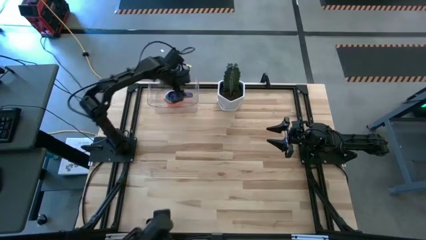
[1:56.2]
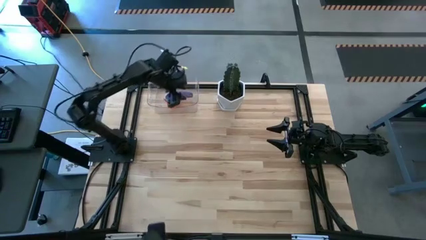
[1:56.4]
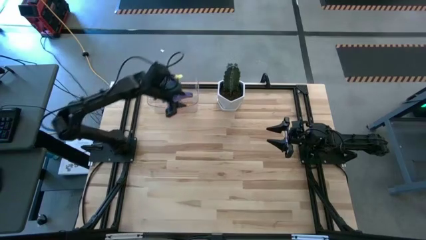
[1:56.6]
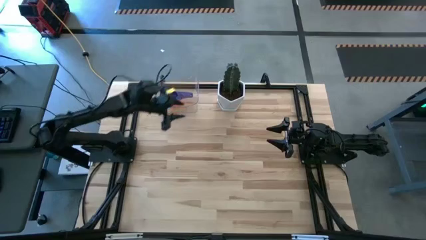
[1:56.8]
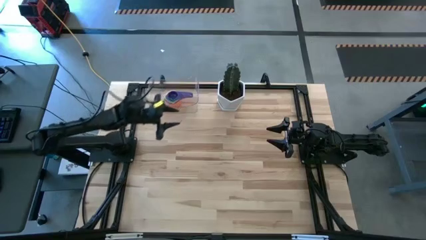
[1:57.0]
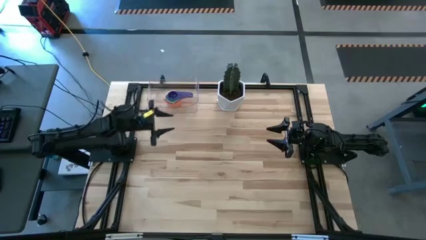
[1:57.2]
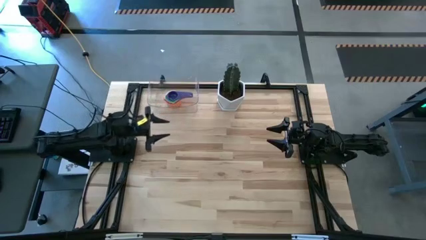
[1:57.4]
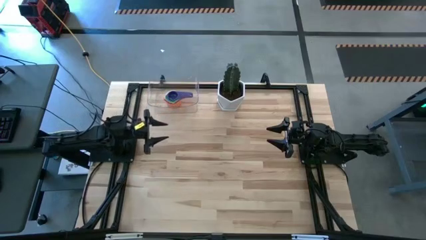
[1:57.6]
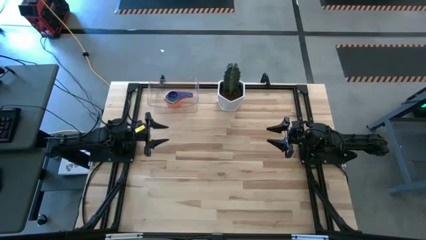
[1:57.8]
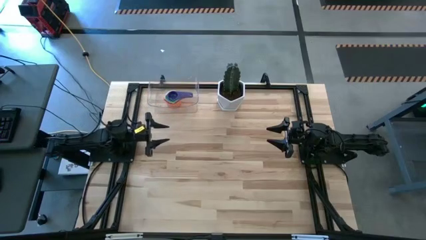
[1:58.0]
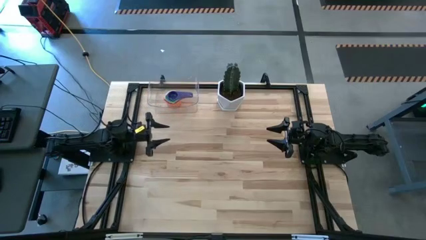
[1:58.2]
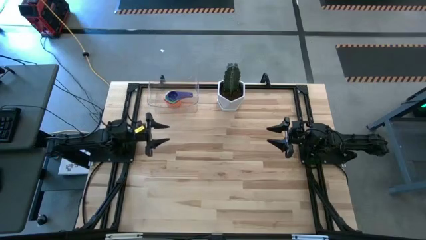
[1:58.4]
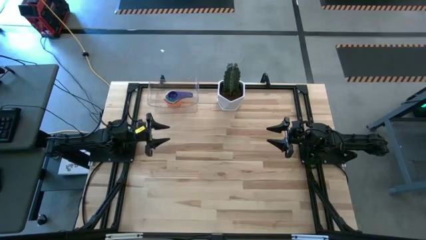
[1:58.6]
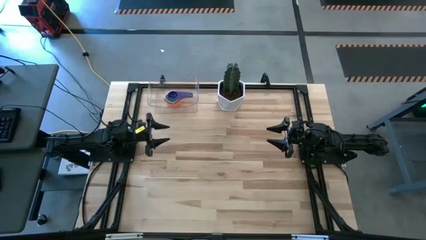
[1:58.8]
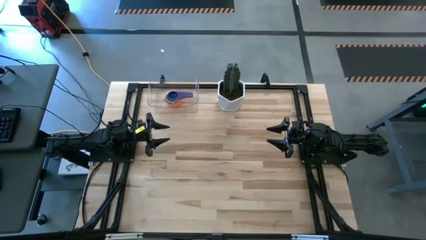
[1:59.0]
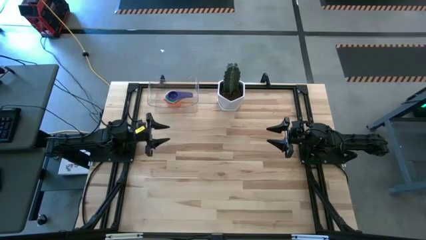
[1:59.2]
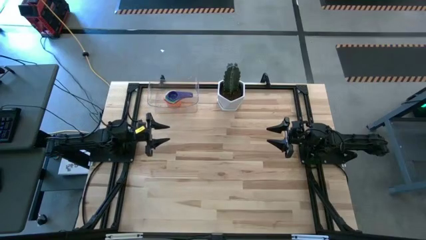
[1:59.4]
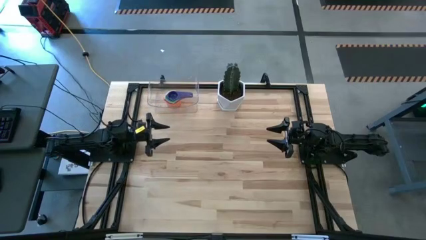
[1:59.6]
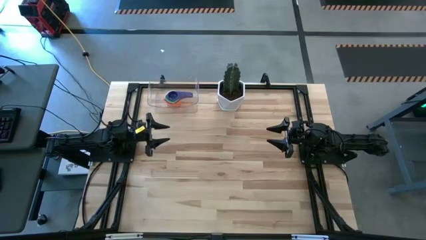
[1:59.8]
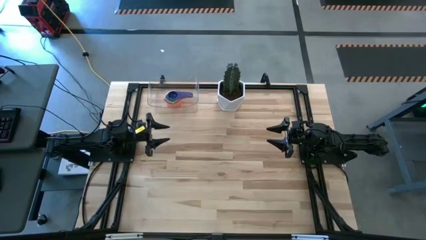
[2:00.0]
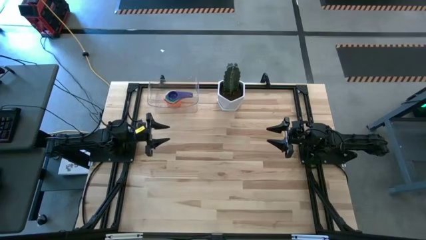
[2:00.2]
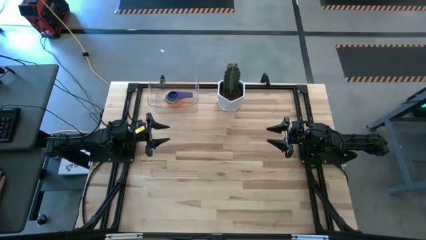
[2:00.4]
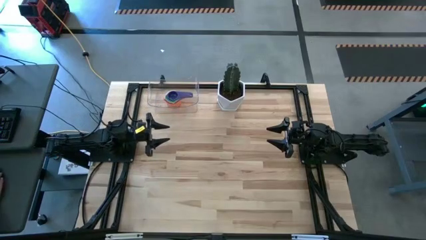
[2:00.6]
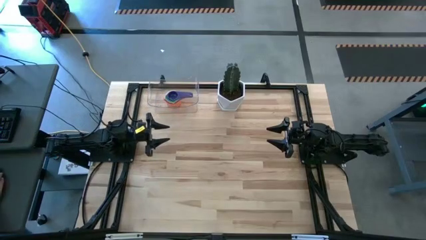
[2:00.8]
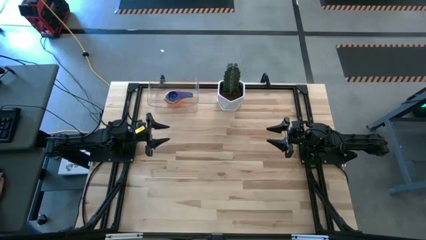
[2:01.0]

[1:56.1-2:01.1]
Task: Nest measuring cups in basket
Return to Home Position

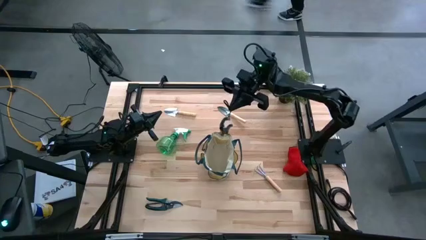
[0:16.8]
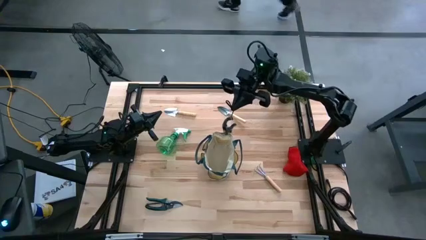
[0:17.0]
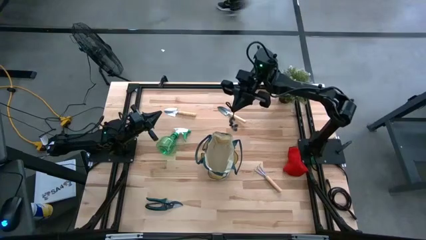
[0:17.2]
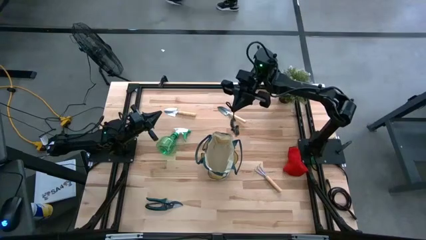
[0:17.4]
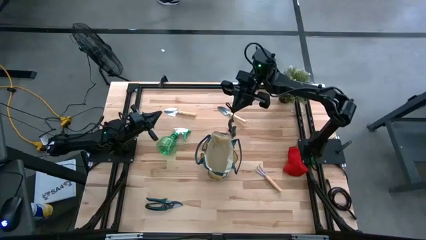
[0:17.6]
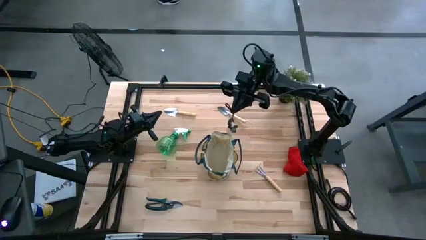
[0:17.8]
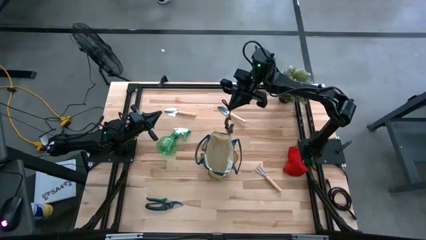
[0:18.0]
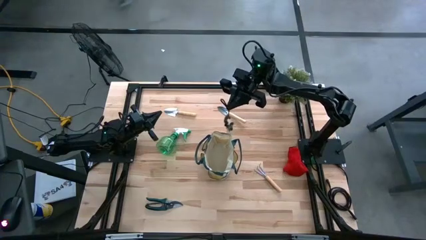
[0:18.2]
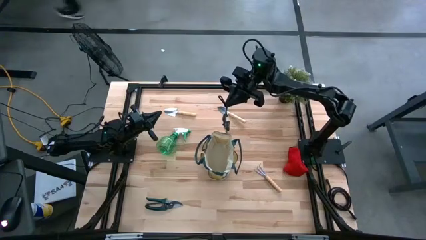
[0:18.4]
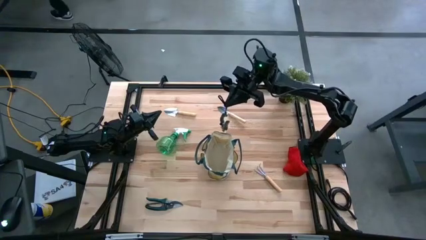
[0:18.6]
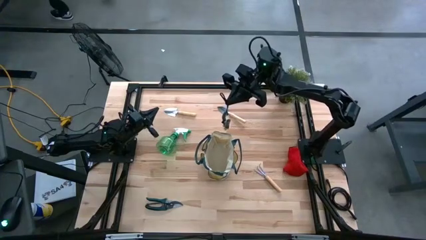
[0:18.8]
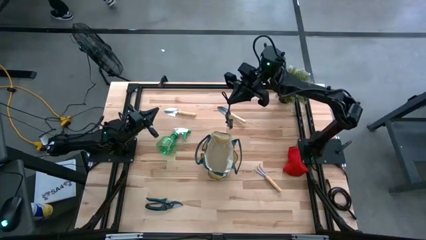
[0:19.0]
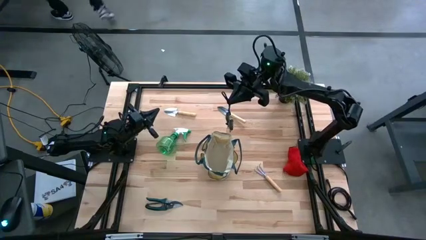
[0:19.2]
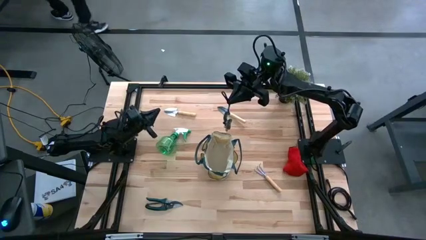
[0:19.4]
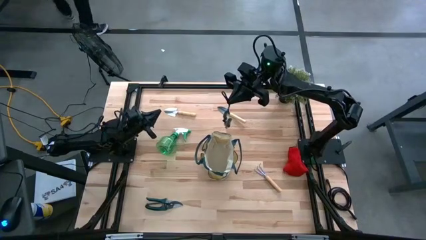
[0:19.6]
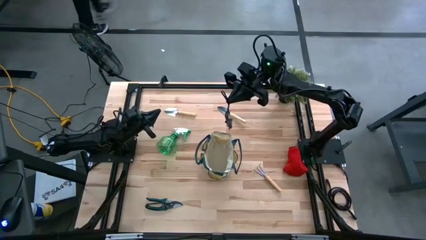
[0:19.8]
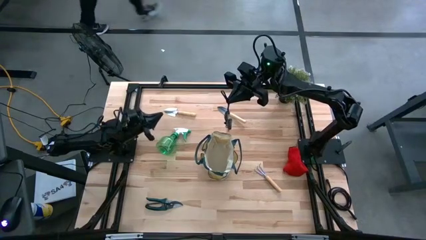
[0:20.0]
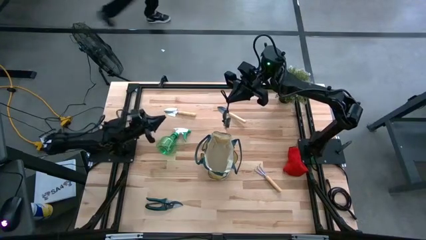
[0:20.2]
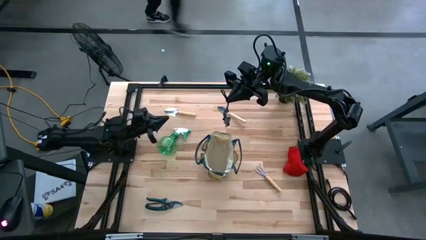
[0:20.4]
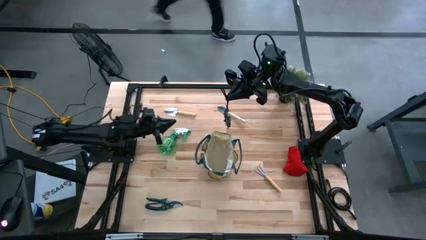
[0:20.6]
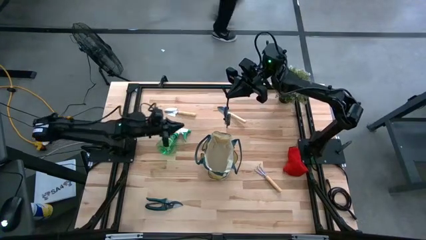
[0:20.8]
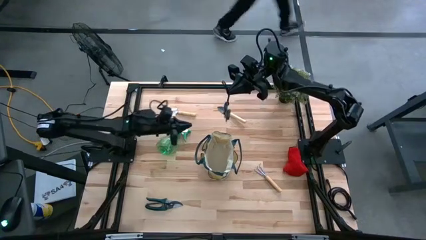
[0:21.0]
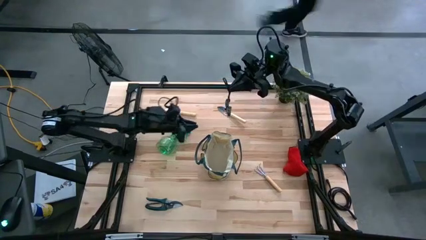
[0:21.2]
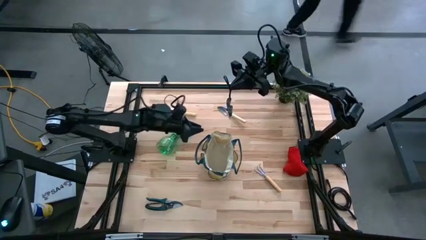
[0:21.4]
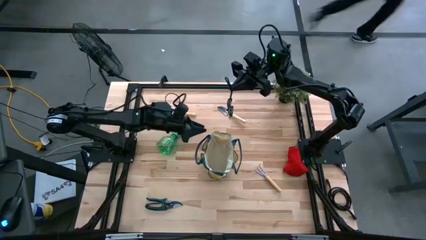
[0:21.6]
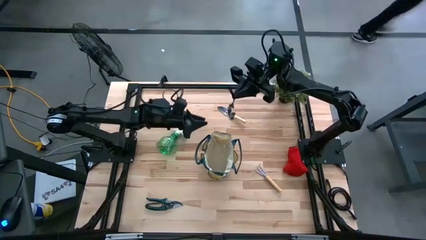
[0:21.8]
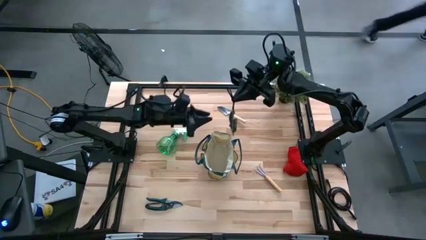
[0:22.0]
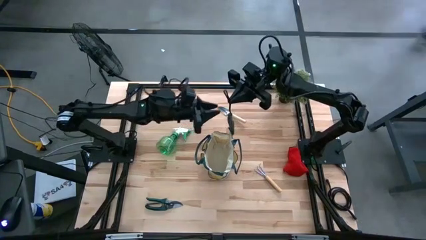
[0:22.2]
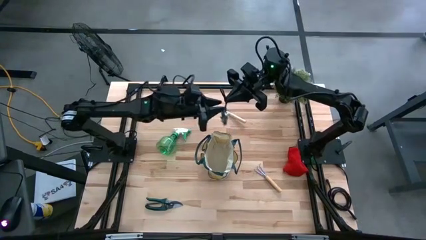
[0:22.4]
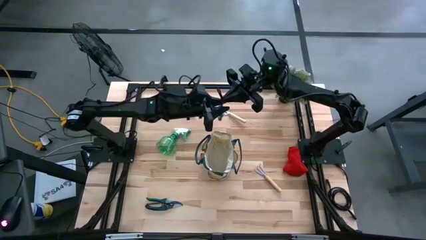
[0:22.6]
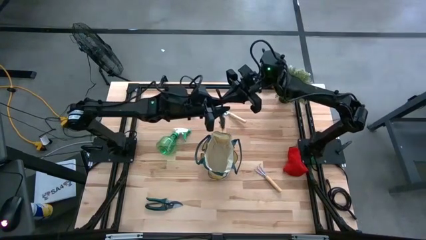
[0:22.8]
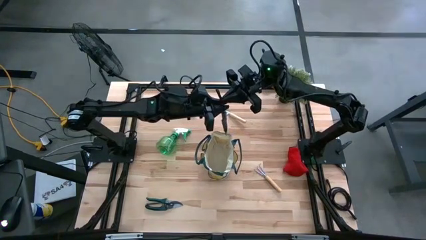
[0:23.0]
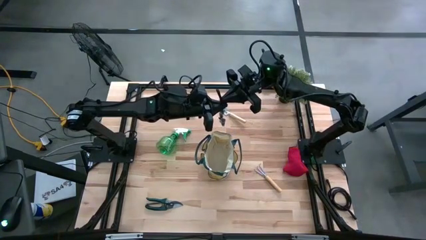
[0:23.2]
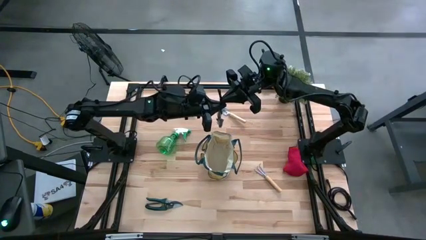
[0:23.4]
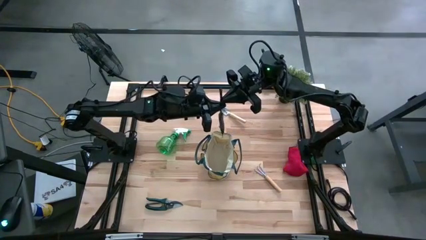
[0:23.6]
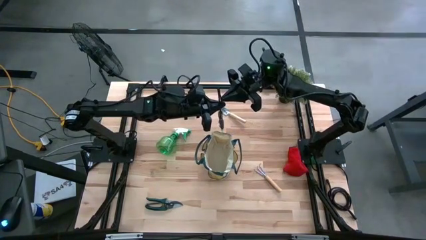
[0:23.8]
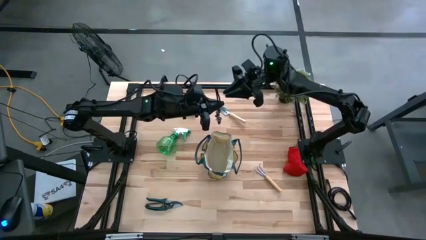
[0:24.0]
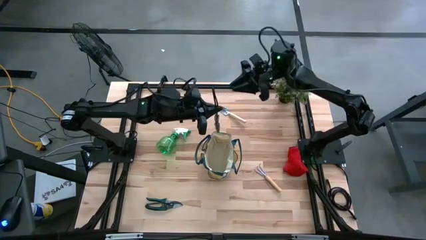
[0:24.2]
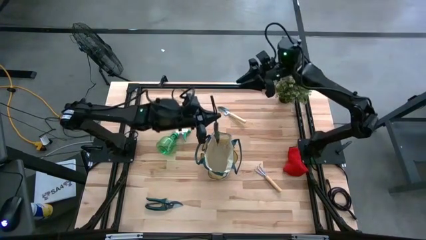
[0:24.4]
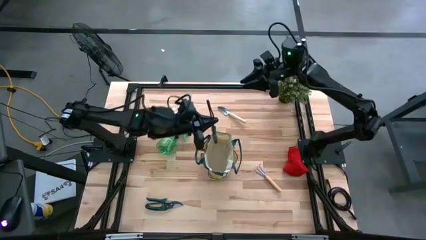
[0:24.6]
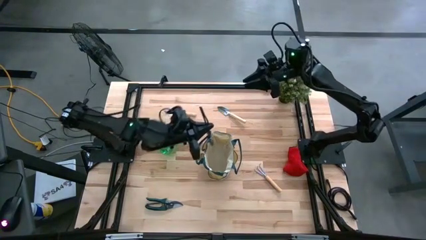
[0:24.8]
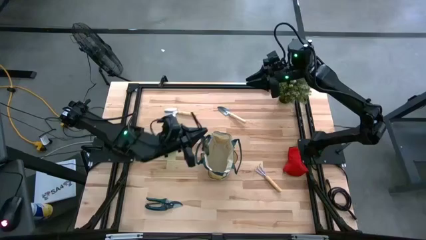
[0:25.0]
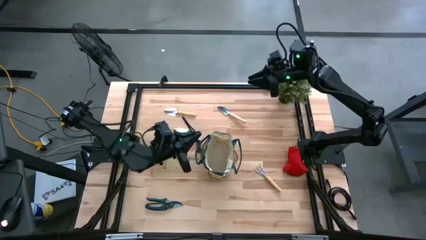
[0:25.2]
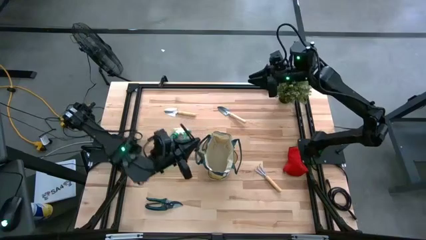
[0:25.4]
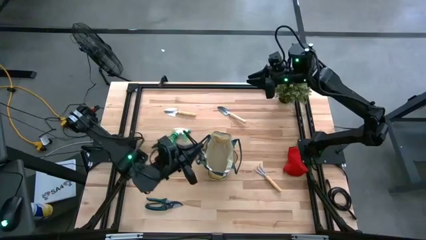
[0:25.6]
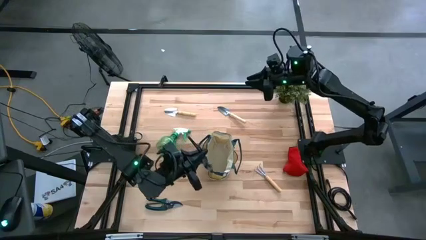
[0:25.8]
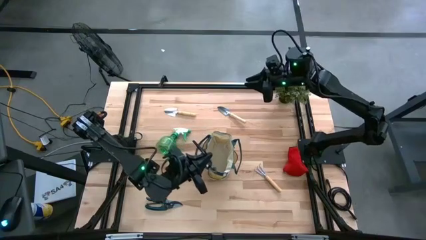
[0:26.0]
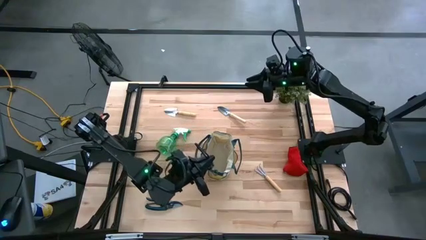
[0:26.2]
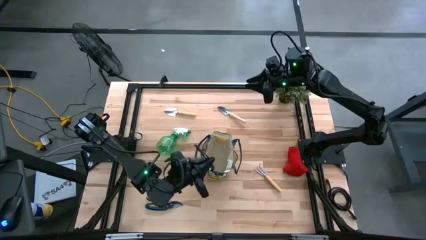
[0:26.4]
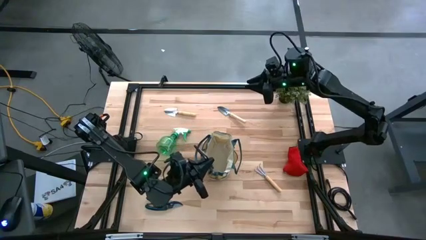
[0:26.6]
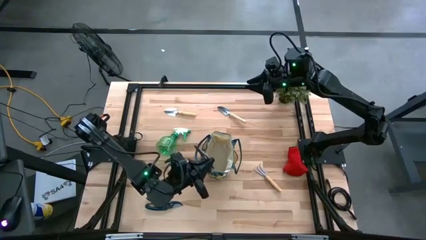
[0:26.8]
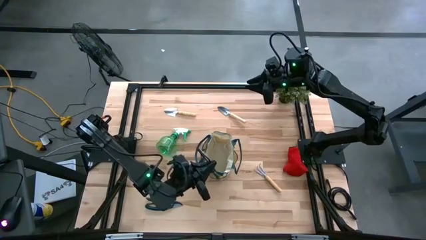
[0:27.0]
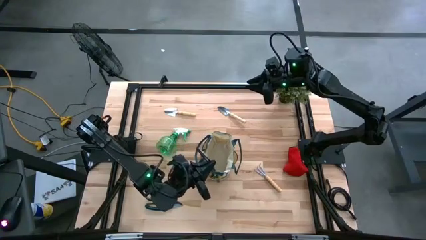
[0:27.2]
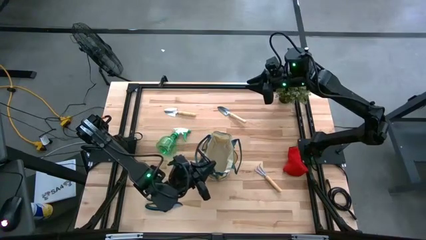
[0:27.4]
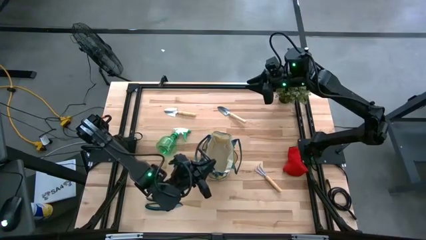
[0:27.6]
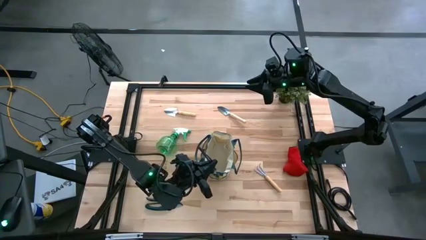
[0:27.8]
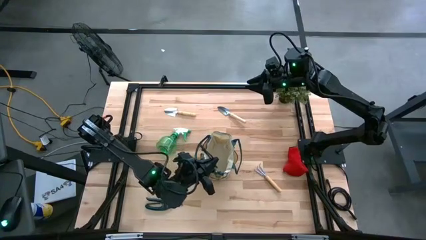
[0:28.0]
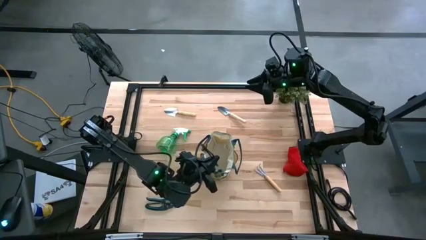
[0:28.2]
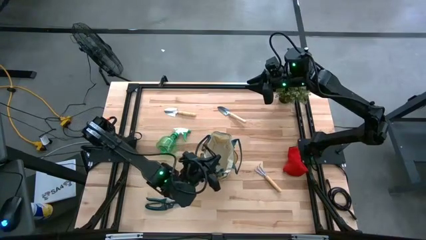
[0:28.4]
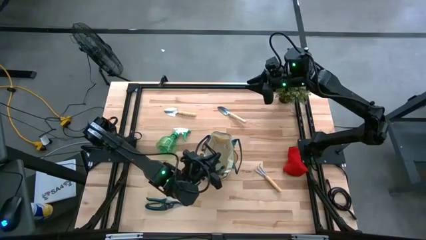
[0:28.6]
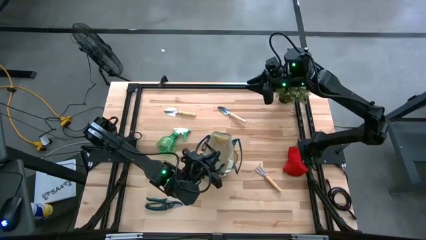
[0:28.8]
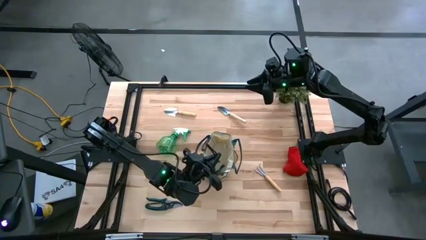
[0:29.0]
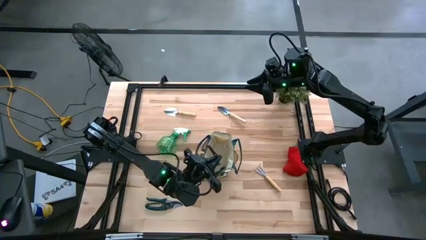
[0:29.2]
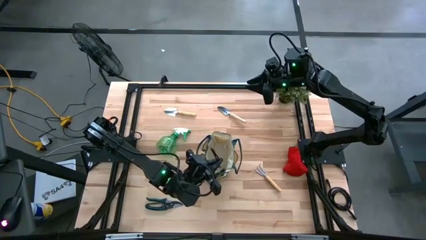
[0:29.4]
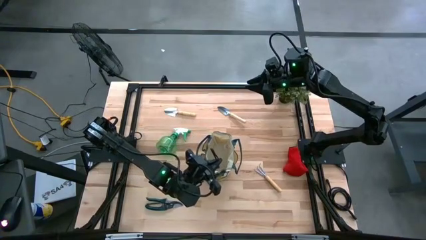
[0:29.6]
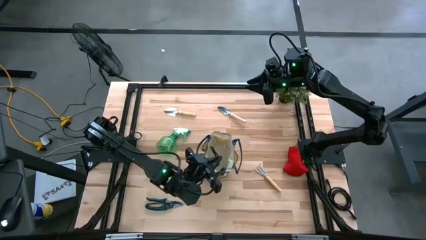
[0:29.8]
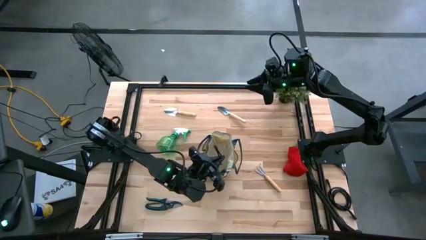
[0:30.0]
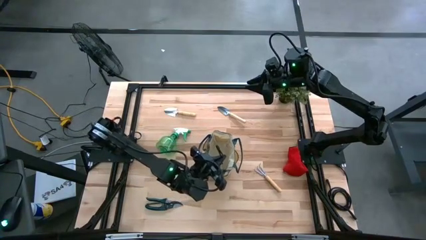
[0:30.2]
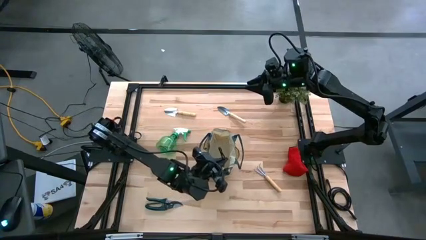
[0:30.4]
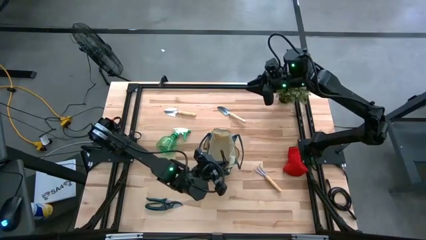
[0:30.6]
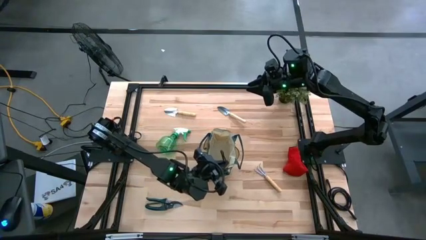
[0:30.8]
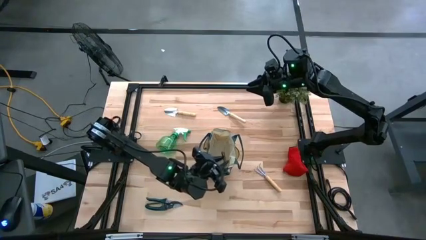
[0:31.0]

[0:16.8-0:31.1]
Task: Pick & Place Garden tools in Gardening bag
Put the green shears into the white gardening bag
